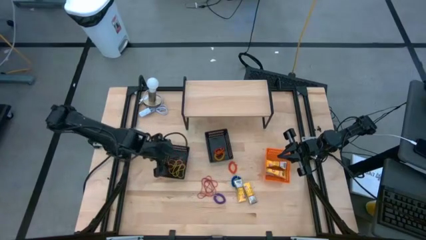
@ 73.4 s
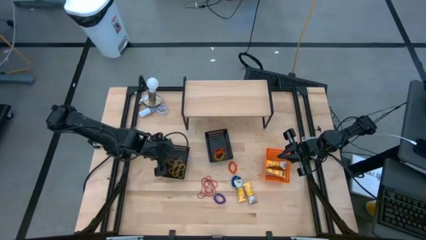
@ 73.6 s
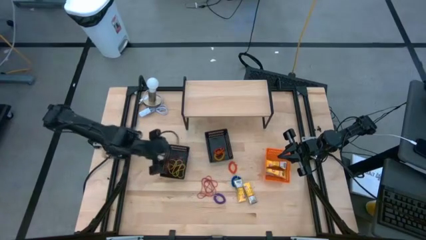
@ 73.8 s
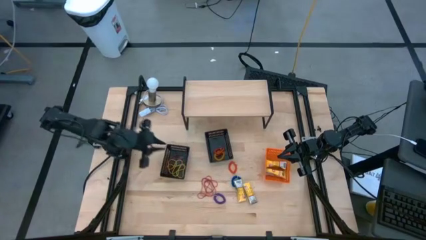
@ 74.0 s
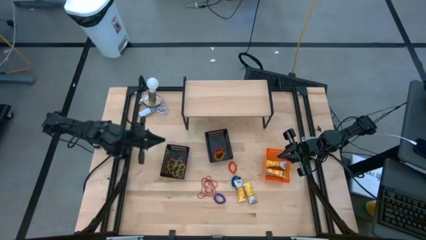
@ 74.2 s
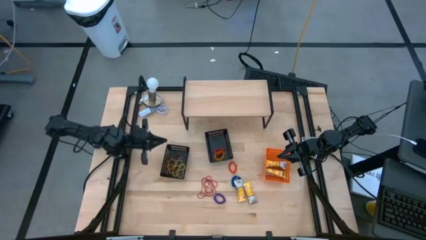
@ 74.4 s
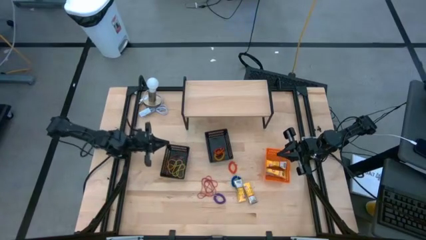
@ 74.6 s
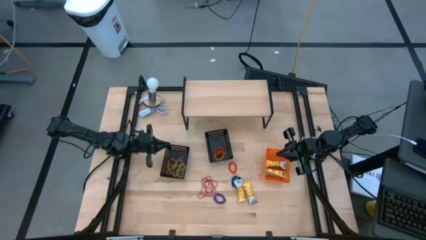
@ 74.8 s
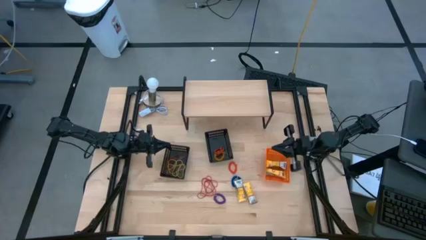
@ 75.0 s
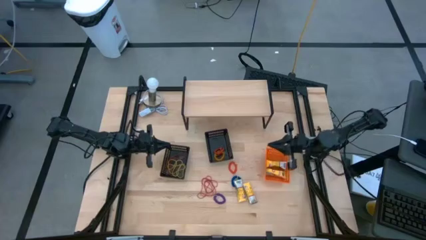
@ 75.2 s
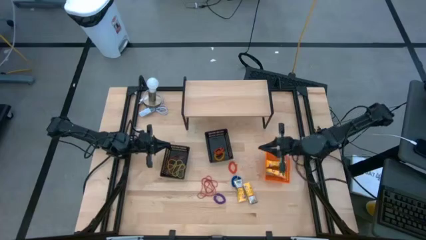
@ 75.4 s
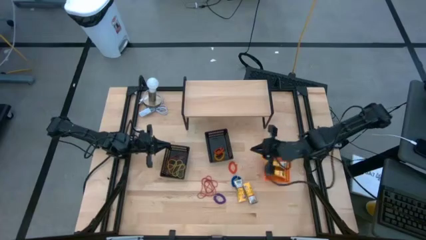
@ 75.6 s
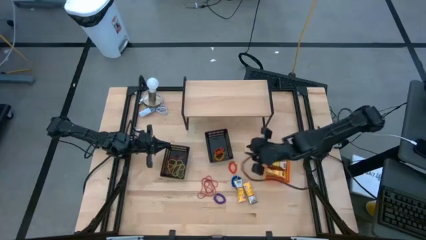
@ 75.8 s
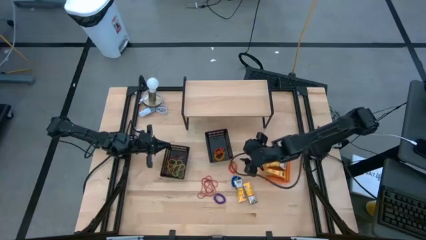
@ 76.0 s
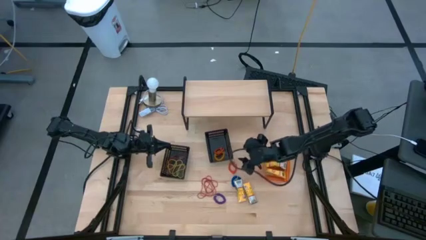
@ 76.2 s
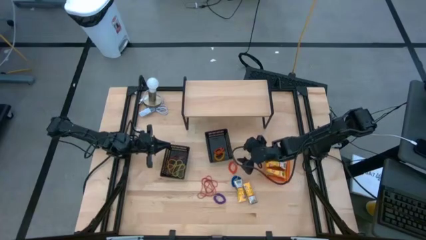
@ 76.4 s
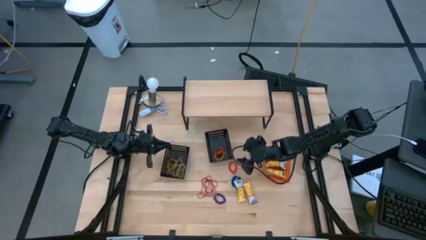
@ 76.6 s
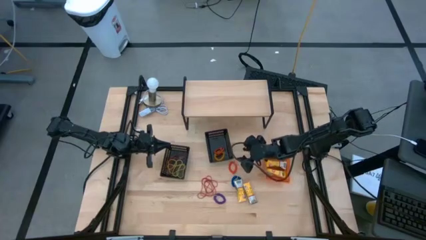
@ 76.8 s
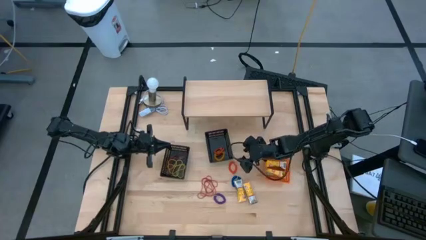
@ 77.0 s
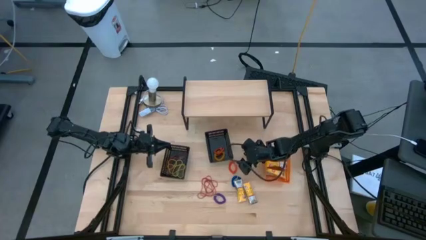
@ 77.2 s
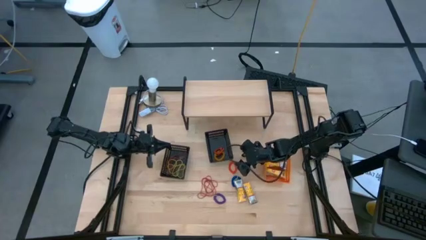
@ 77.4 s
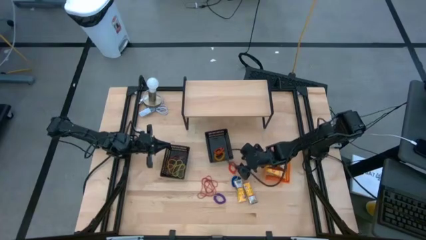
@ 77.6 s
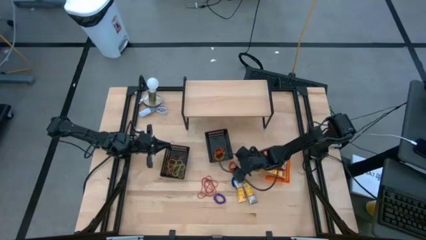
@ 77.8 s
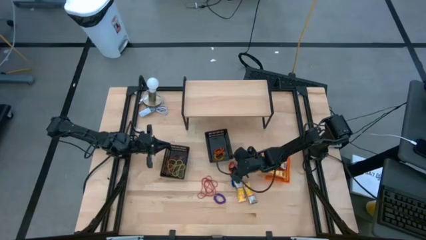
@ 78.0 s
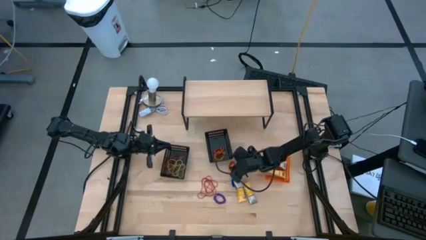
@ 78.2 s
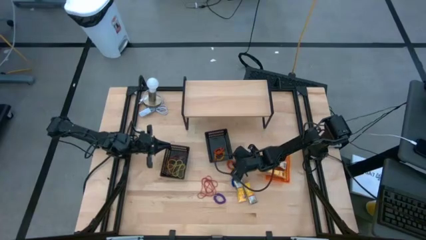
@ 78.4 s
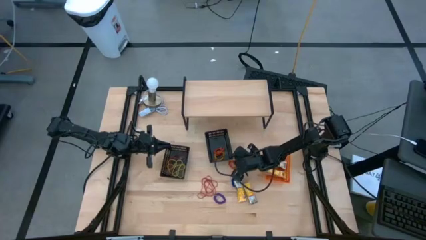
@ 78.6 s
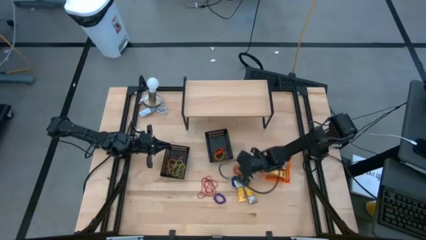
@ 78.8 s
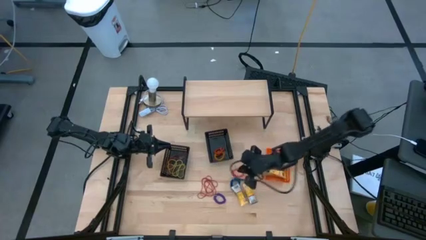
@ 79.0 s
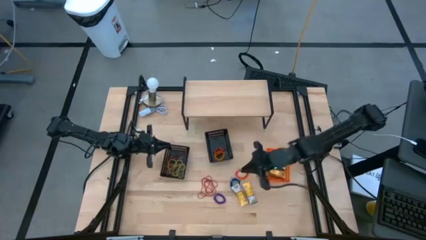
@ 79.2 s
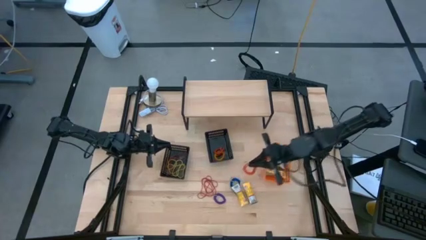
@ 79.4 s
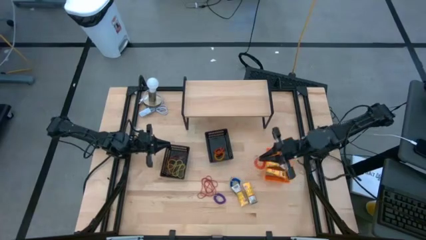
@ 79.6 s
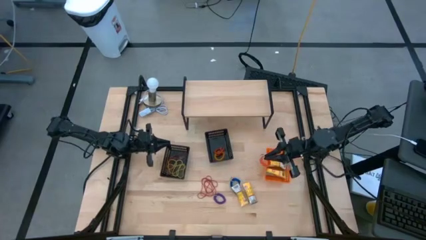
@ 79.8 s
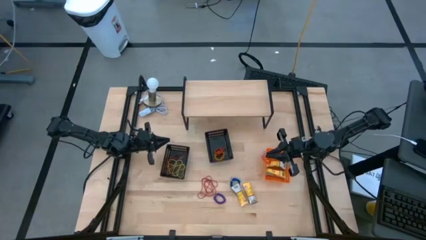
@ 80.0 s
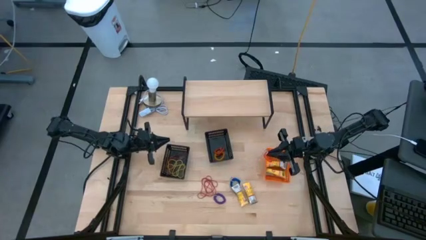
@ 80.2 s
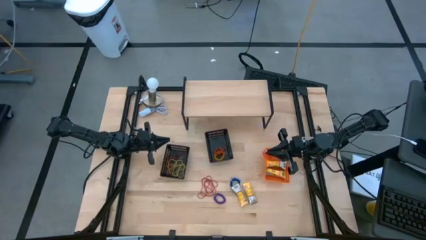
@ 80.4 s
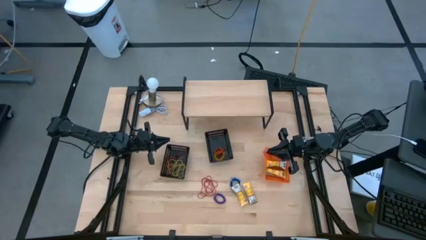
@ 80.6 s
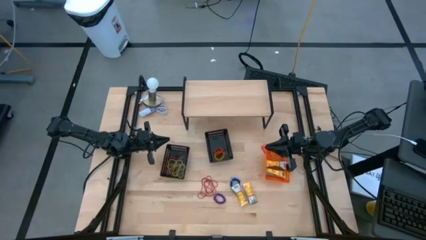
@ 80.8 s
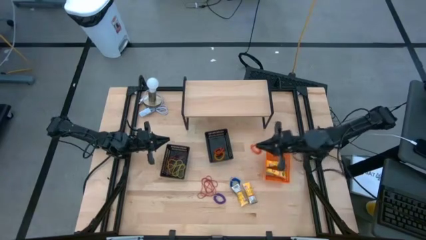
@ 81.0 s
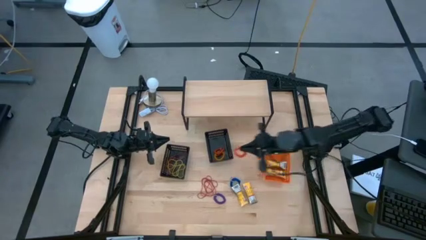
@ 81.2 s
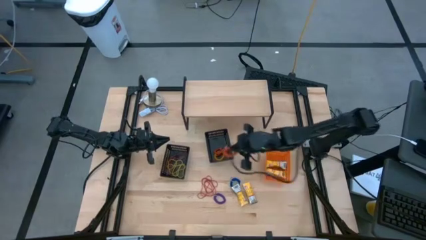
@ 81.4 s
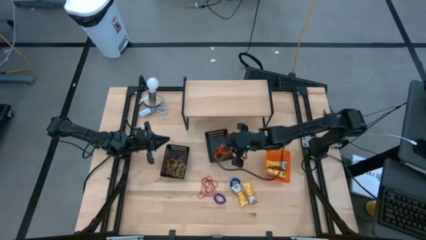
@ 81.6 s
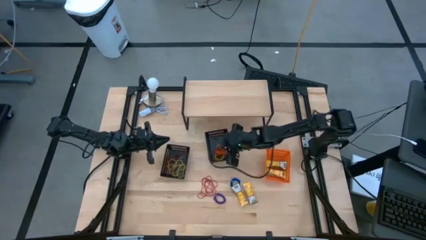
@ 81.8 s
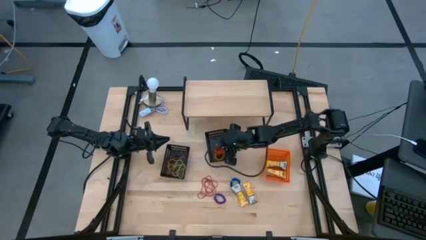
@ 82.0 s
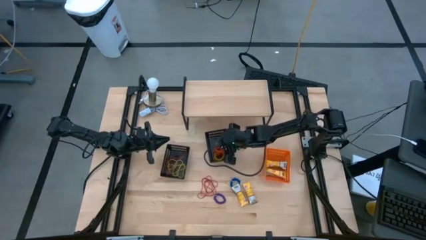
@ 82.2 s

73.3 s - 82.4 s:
Task: Pick & Place Office Desk Supplies
Put the orange spring keychain into the right black bin

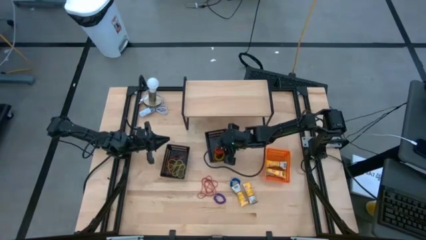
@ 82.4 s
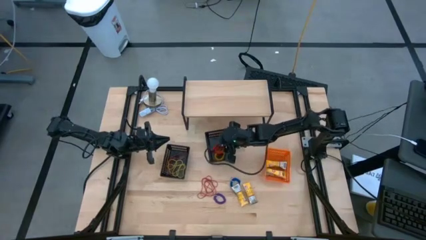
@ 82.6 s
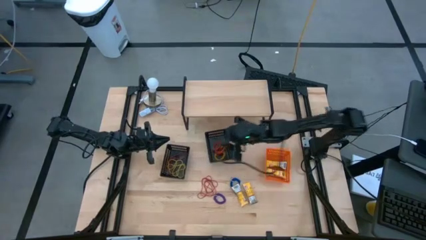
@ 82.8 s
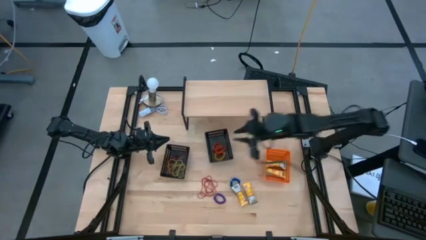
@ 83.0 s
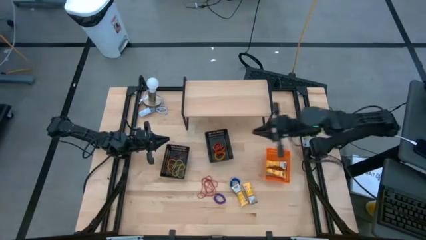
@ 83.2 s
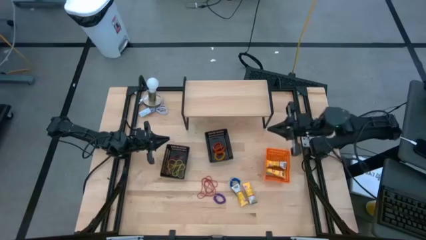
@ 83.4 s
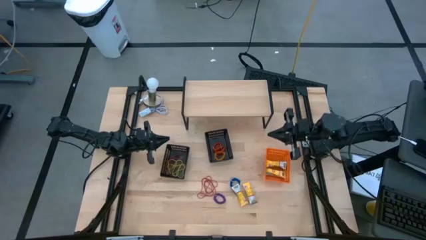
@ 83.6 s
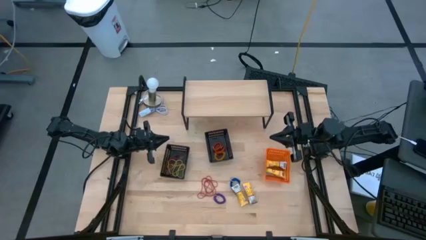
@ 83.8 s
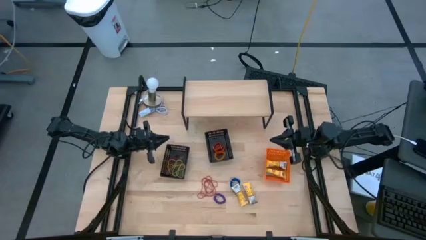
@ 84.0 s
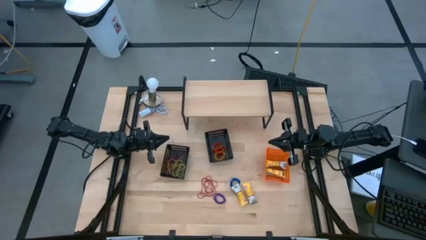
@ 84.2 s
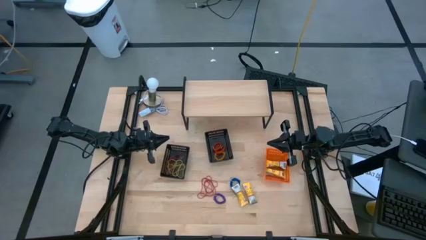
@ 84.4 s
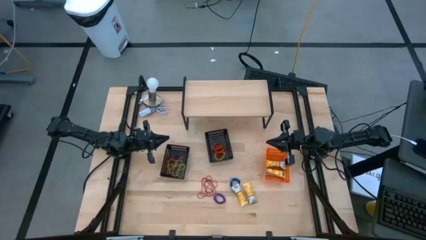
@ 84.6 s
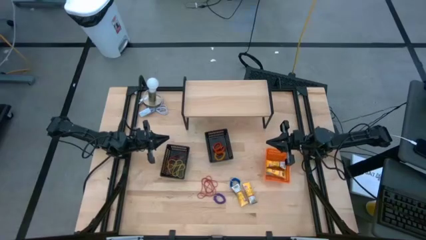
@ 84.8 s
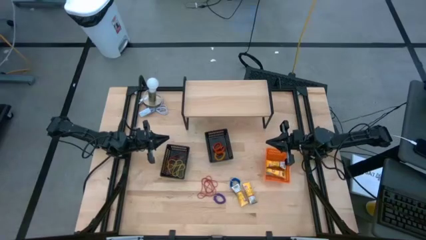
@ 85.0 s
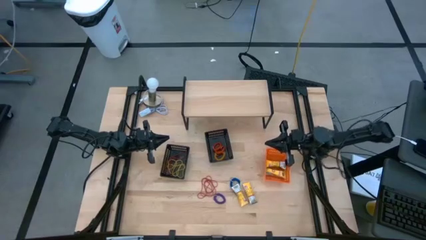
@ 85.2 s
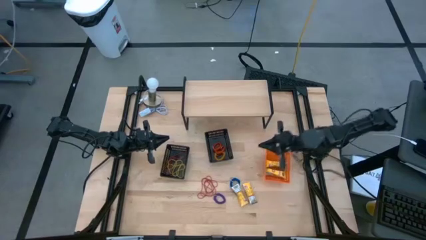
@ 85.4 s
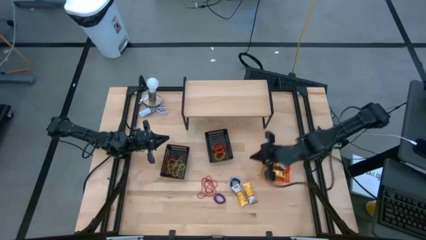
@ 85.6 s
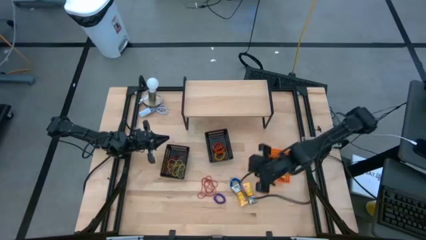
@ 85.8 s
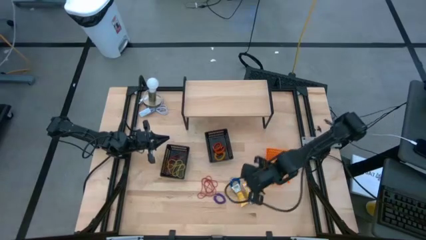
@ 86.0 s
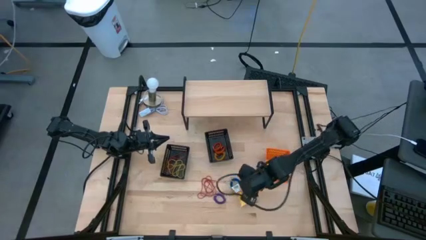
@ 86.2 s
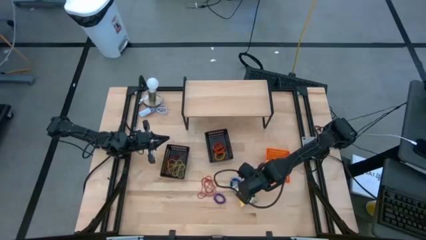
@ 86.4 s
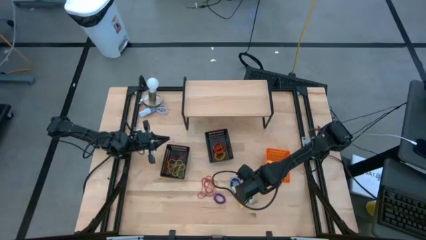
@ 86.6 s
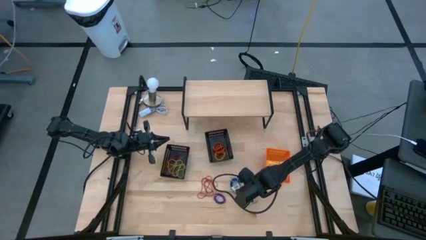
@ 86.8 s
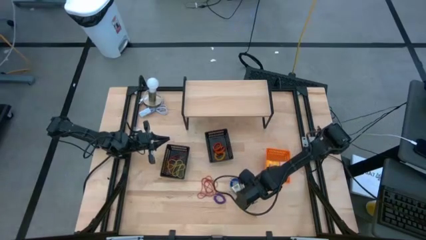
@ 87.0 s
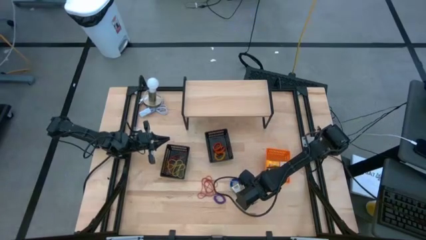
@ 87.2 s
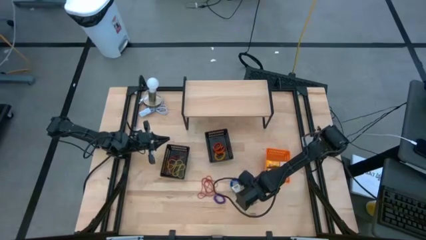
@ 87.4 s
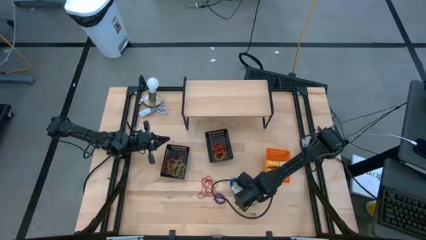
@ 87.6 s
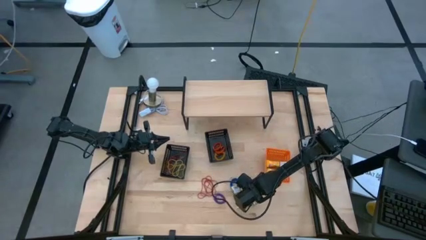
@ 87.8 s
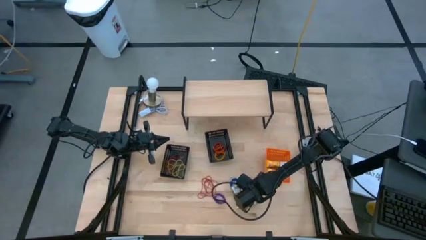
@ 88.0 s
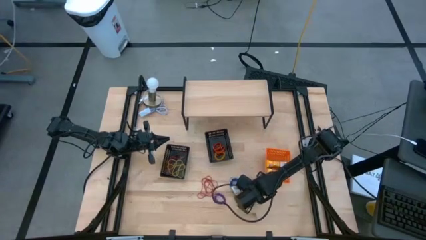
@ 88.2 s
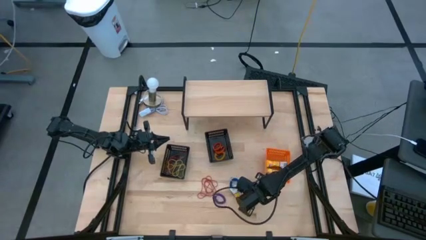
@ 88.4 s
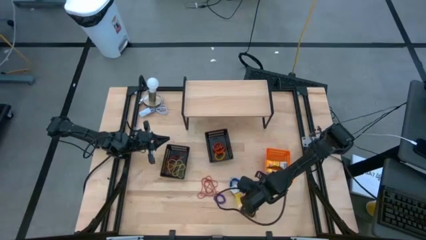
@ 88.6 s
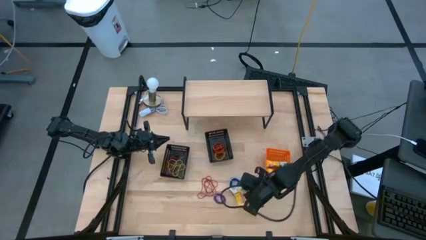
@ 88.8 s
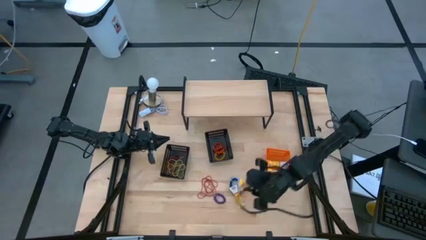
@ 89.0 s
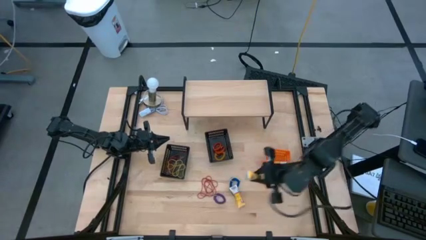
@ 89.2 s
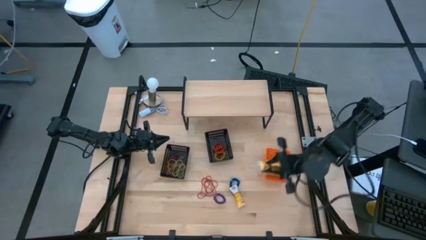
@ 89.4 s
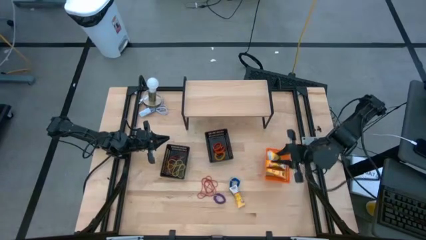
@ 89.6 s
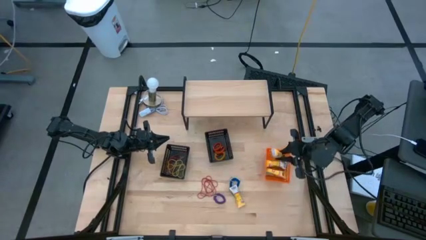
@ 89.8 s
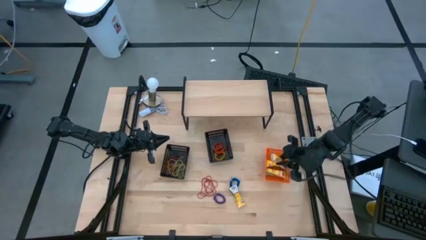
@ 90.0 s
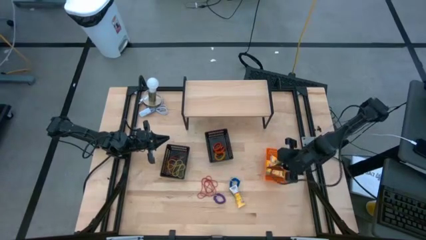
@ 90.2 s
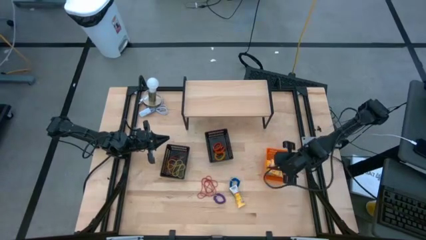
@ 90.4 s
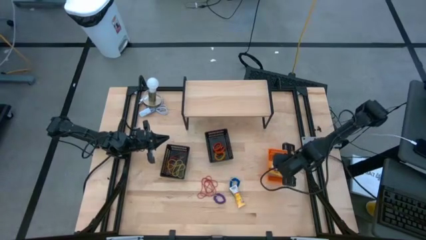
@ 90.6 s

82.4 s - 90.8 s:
Put the yellow crayon box into the orange bin
